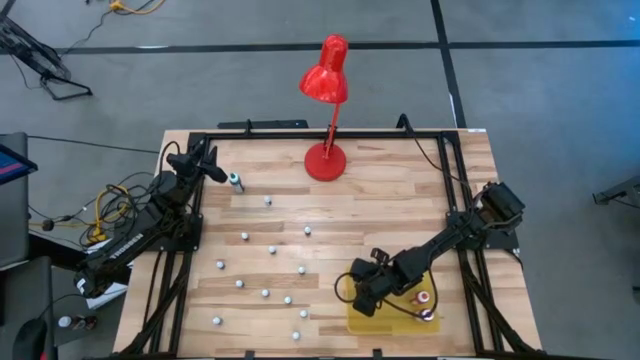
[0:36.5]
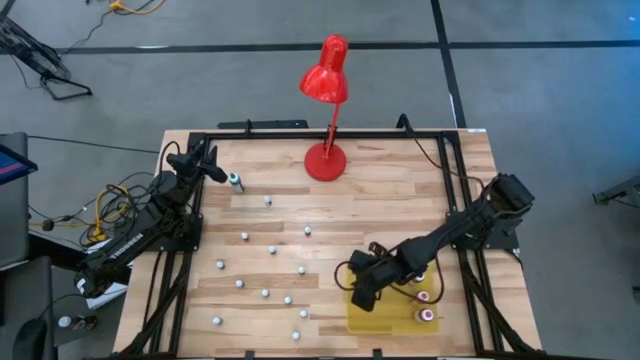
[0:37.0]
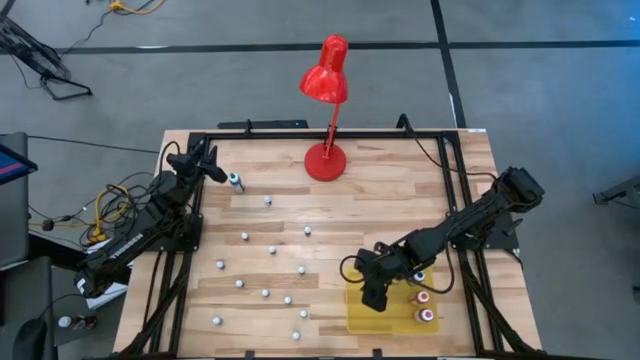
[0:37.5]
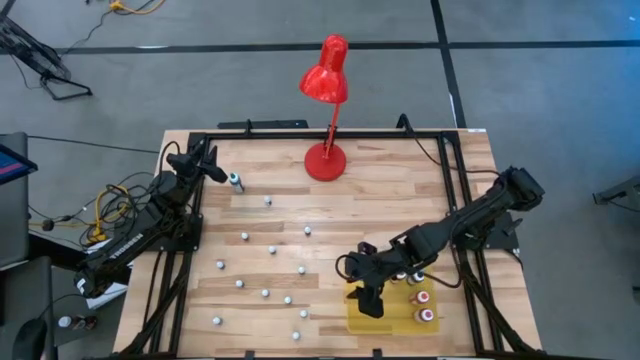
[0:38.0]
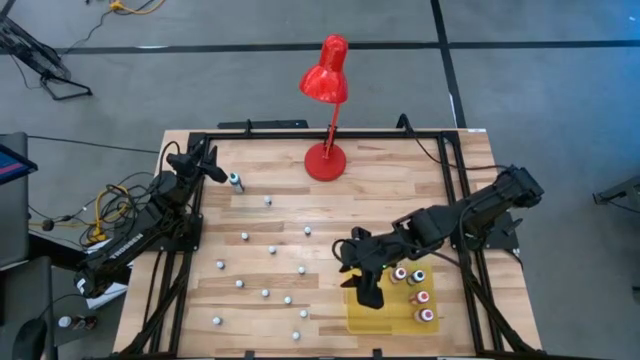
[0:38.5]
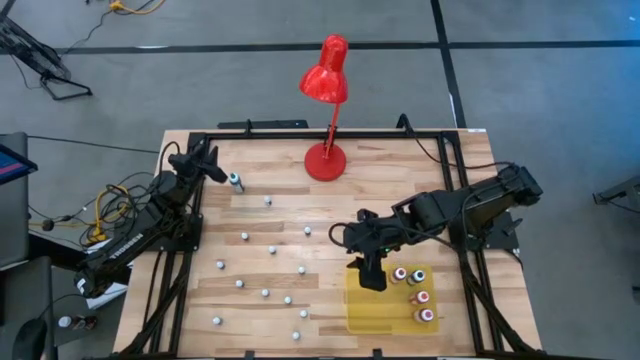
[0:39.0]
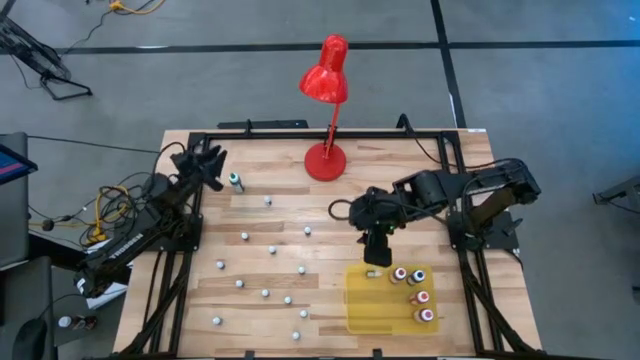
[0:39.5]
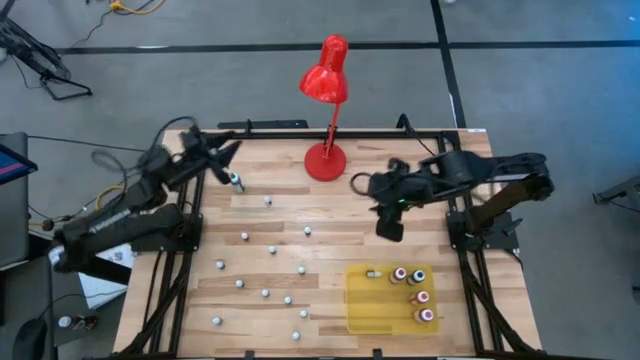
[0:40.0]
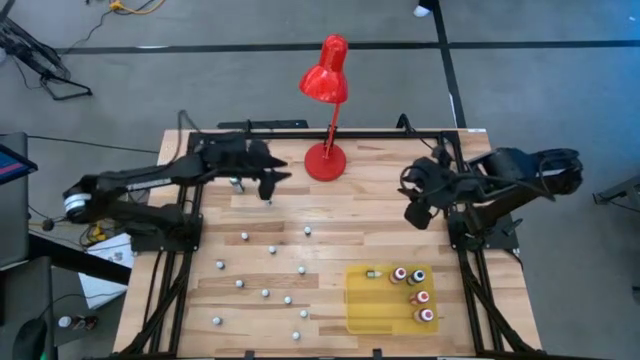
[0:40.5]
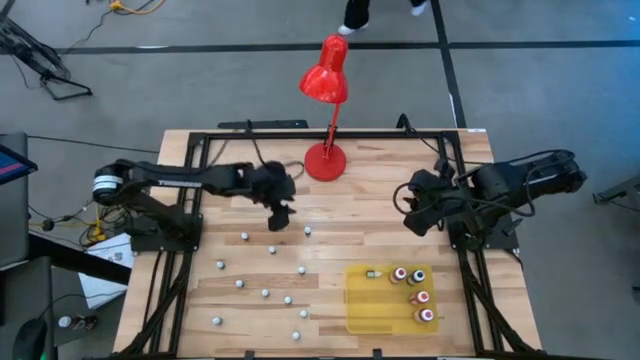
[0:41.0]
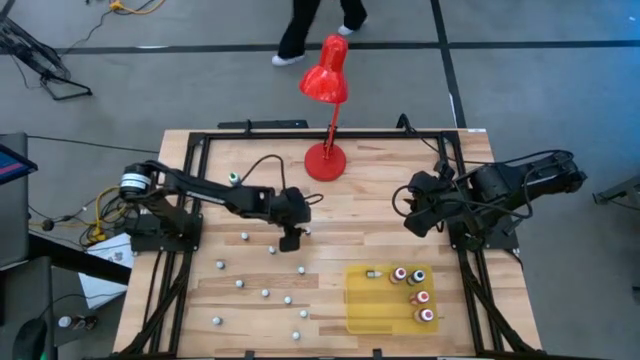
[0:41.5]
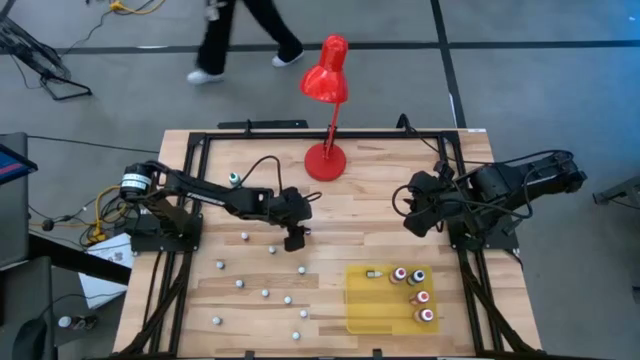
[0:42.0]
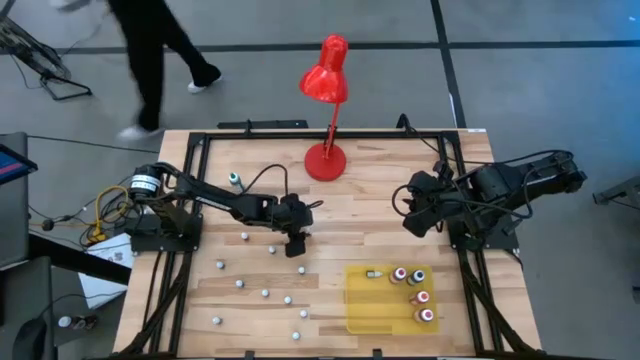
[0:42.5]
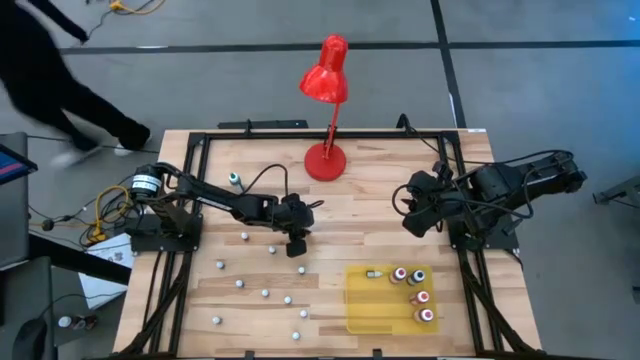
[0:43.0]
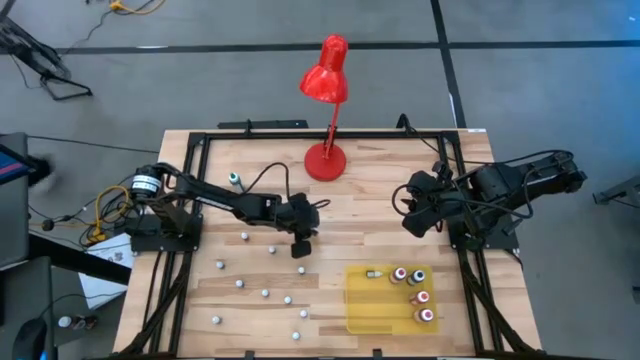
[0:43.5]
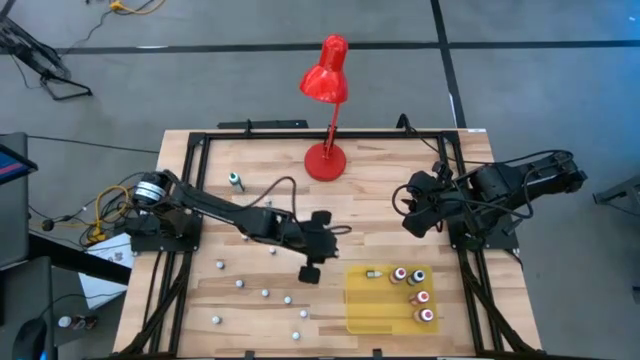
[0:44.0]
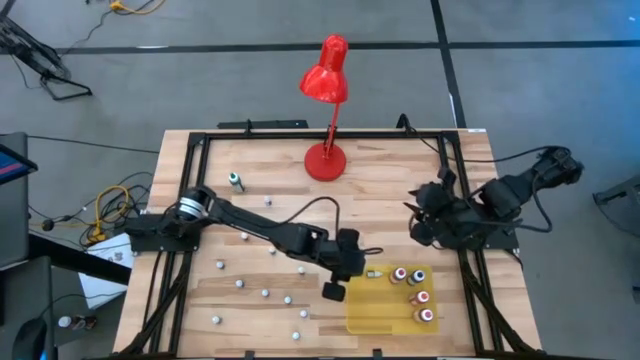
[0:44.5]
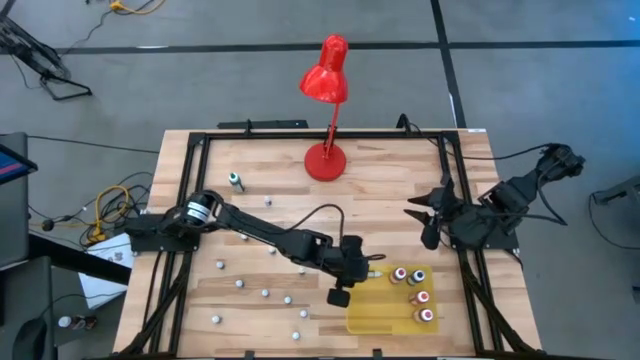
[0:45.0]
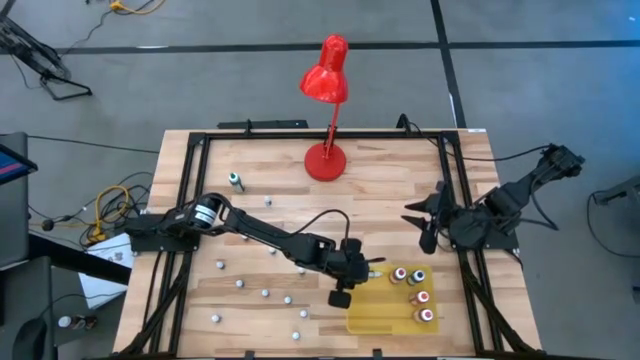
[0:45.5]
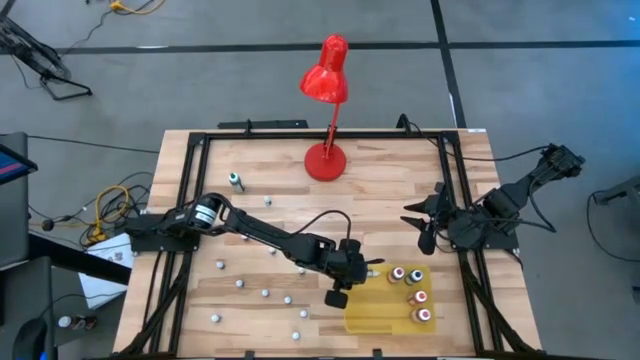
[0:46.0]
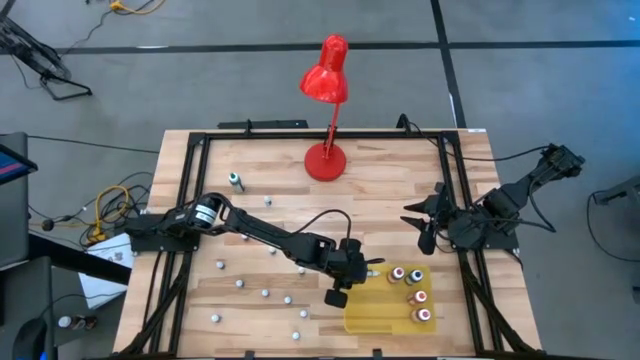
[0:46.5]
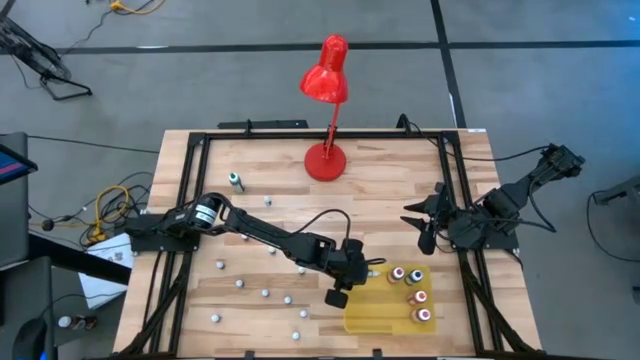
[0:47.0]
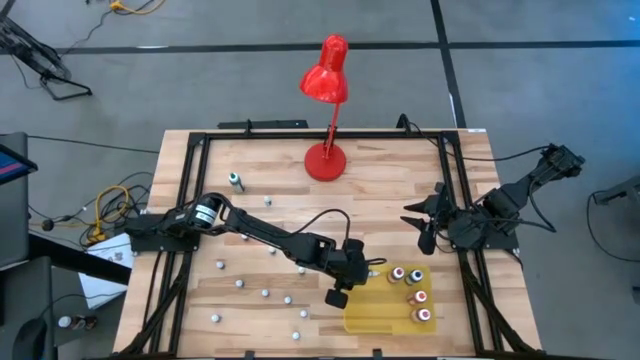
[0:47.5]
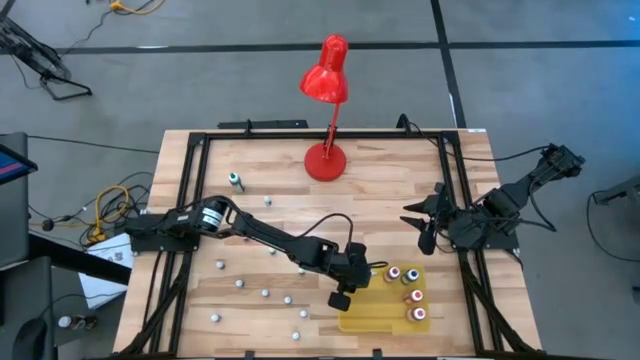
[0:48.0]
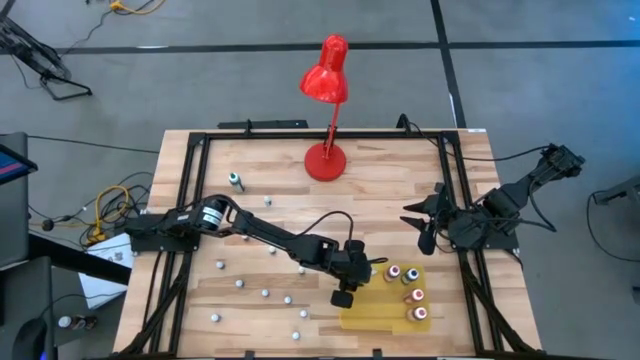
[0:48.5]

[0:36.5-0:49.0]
Task: Pick & Place food coloring
Put the brown food coloring into the yellow bin

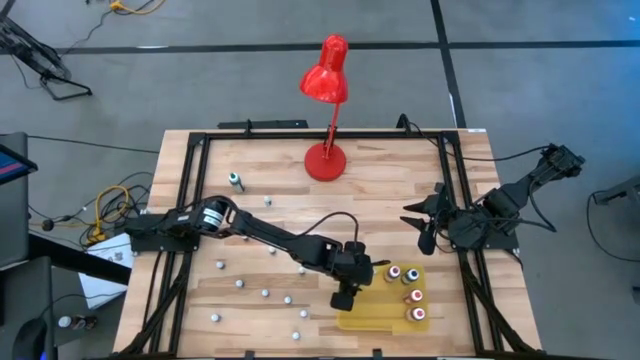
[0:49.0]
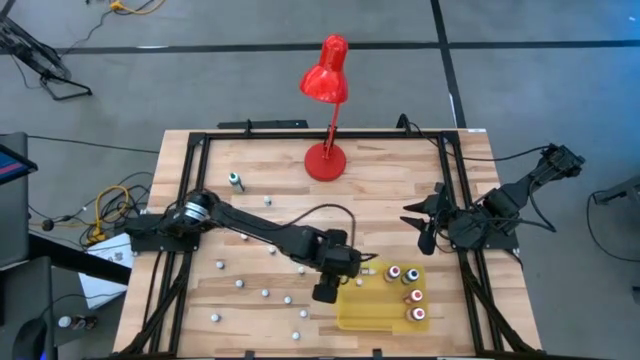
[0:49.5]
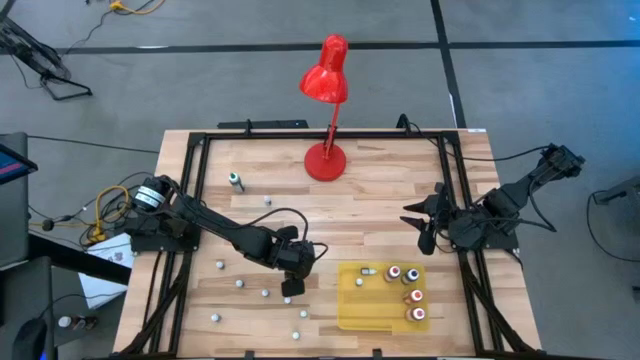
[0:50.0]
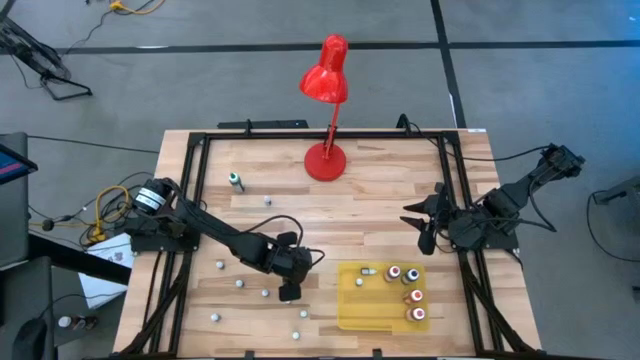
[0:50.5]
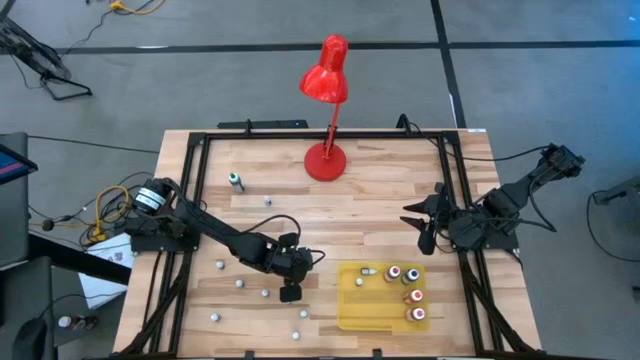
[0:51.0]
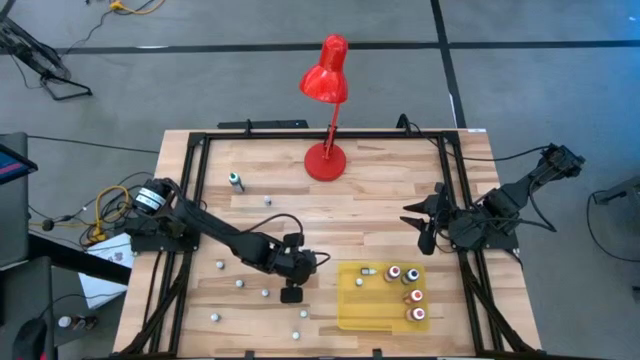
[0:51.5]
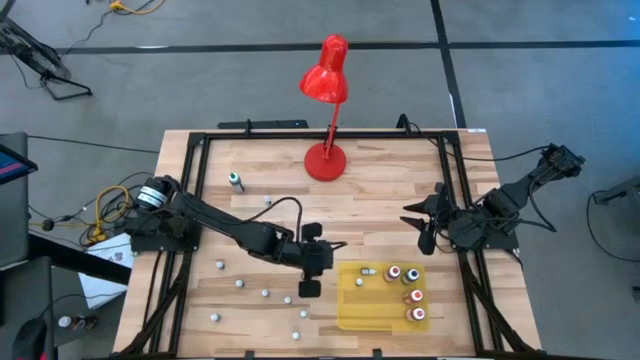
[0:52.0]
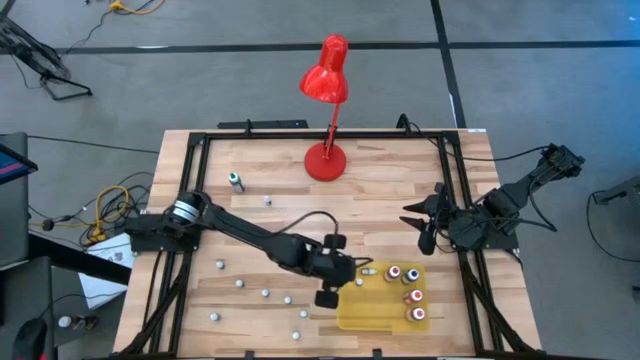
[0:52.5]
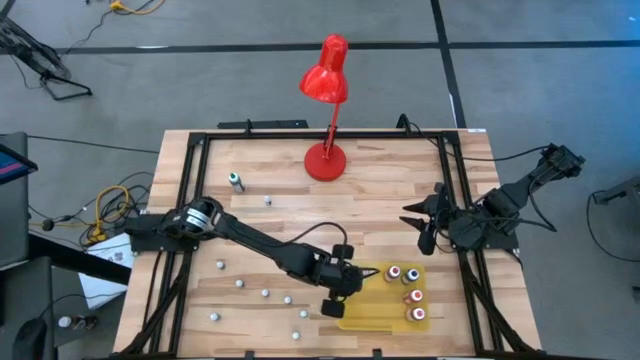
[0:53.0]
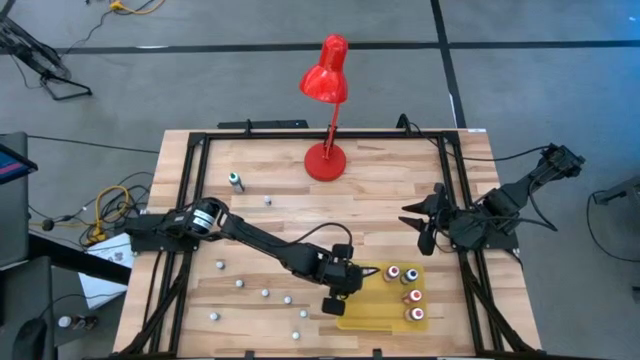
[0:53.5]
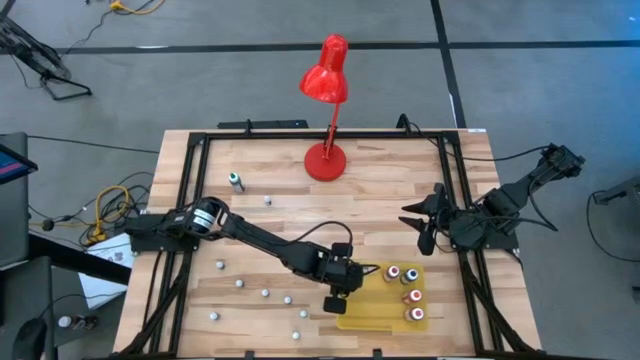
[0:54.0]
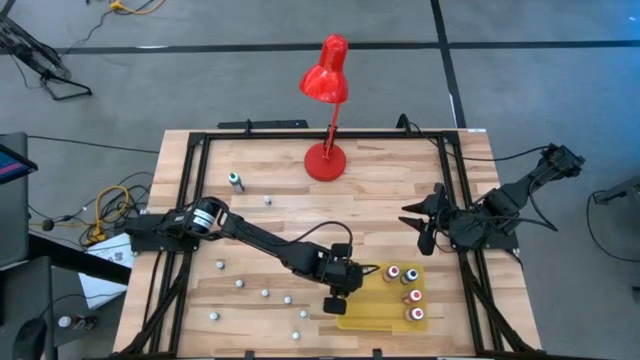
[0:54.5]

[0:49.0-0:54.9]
Put the brown food coloring into the yellow bin

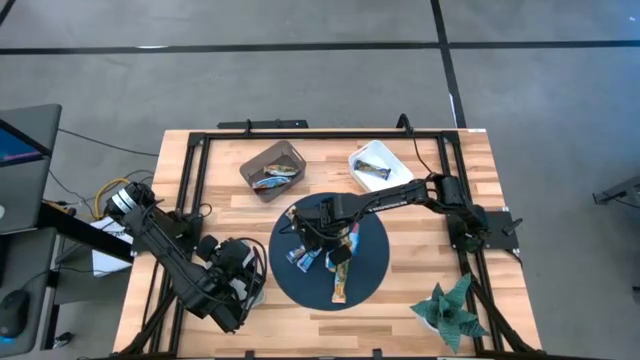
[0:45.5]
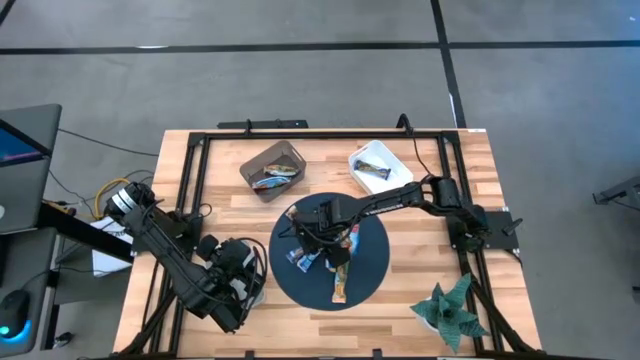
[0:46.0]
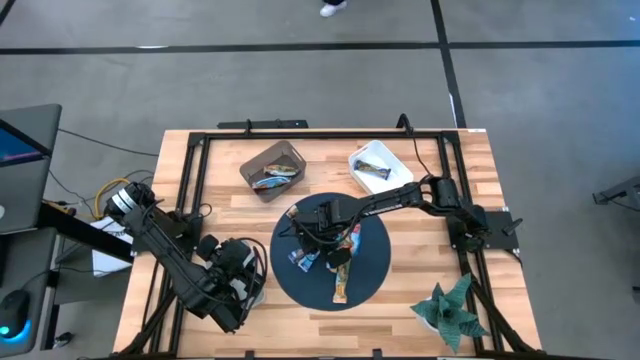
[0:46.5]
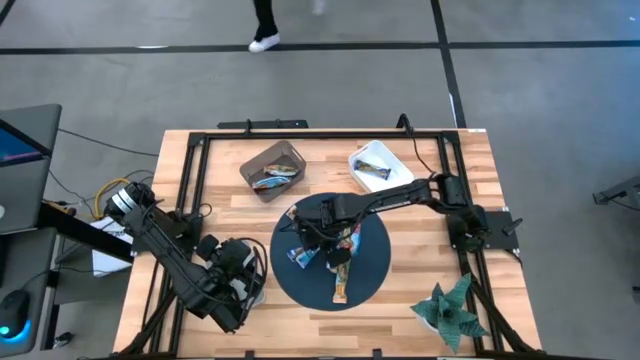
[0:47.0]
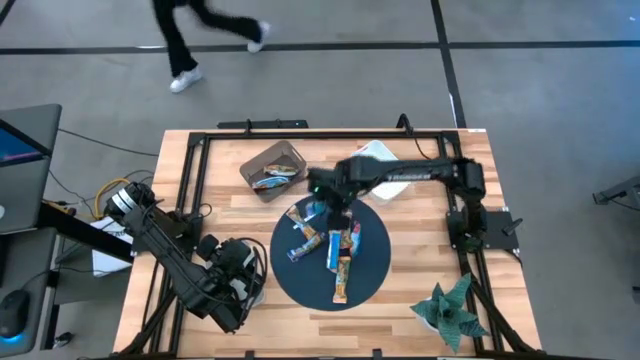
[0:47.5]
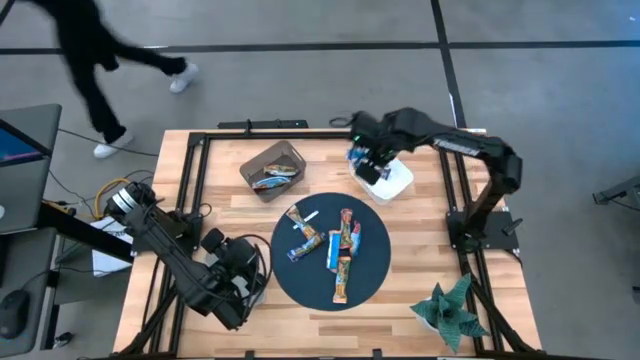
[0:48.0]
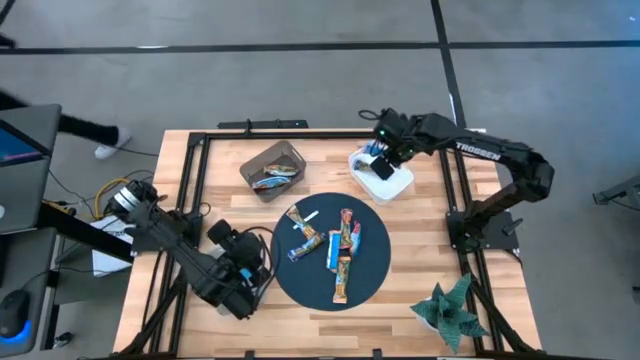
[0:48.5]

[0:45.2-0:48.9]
Task: Pick and place Granola Bars by type
Put the blue granola bar into the white bin
